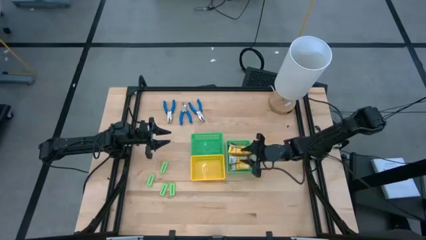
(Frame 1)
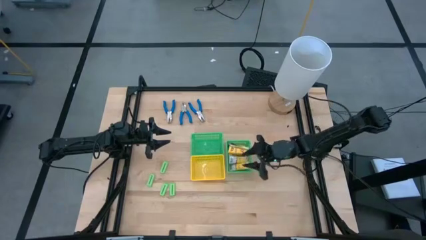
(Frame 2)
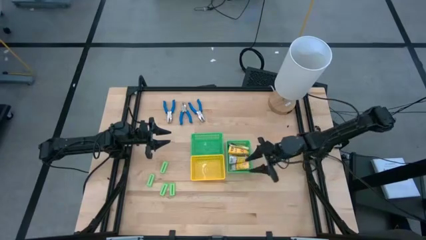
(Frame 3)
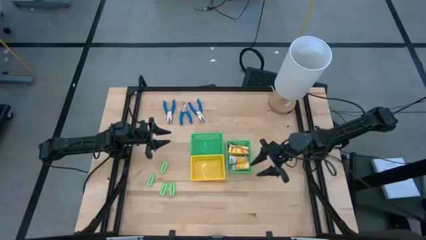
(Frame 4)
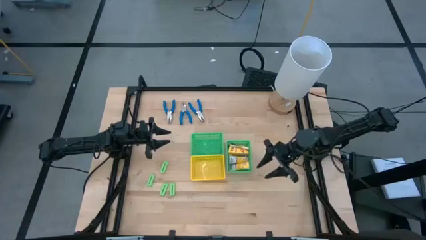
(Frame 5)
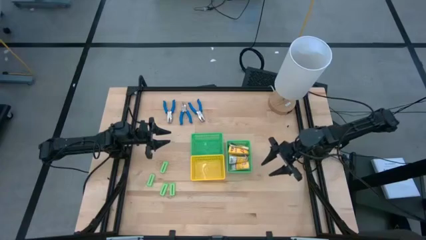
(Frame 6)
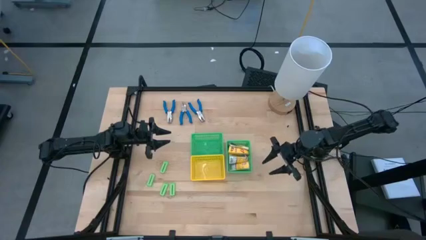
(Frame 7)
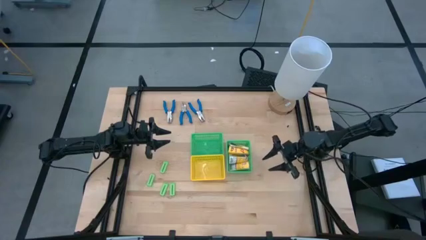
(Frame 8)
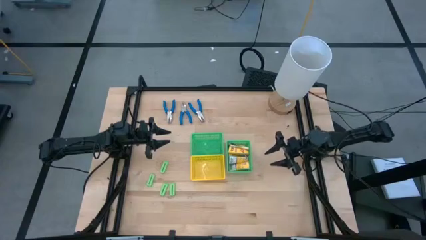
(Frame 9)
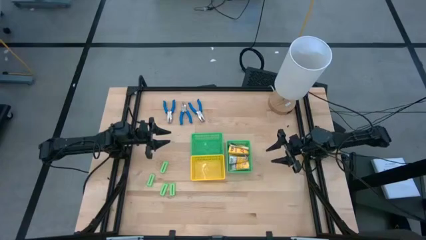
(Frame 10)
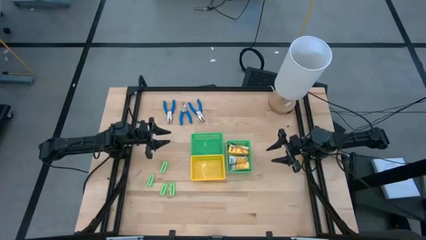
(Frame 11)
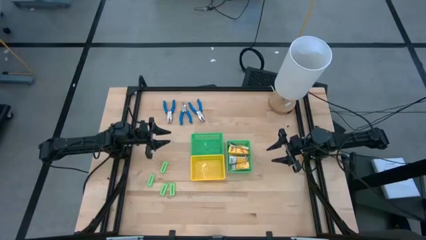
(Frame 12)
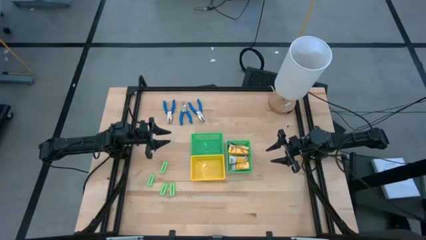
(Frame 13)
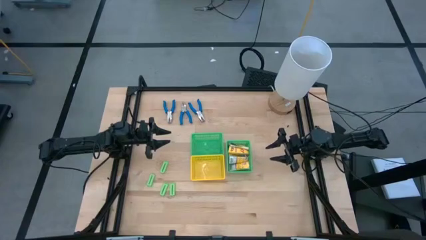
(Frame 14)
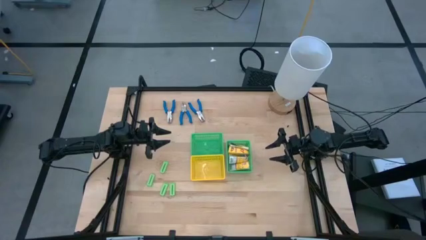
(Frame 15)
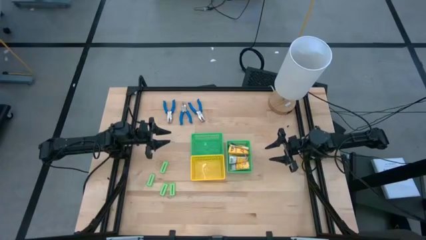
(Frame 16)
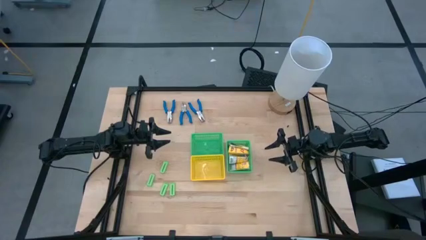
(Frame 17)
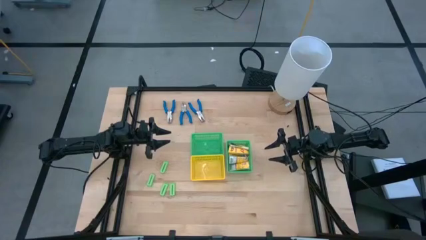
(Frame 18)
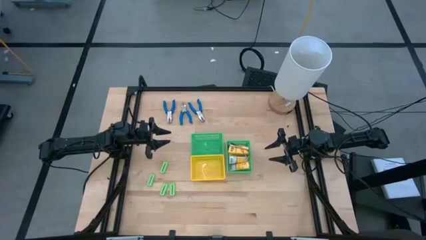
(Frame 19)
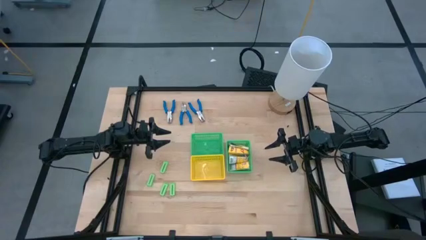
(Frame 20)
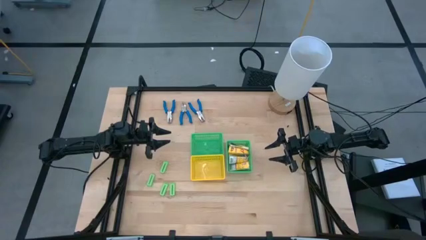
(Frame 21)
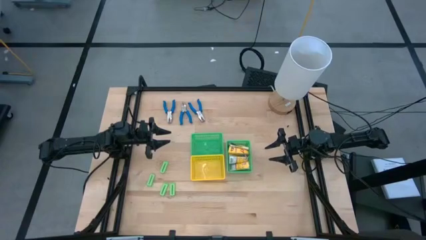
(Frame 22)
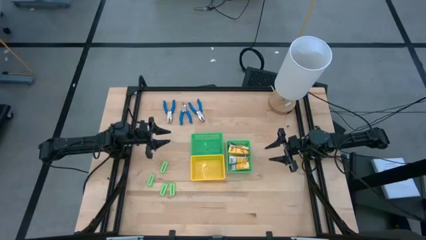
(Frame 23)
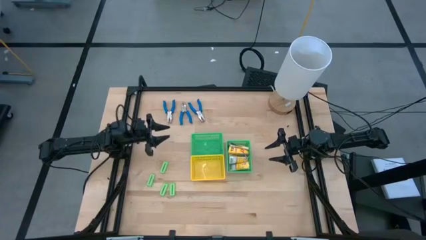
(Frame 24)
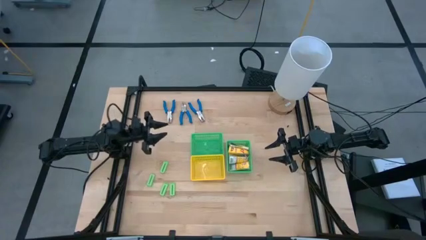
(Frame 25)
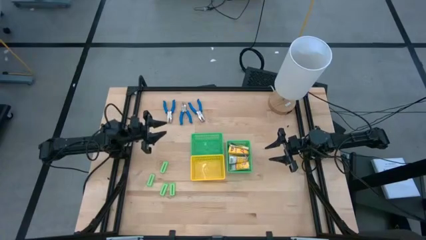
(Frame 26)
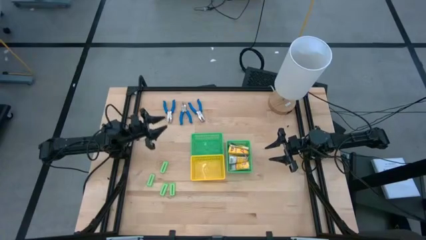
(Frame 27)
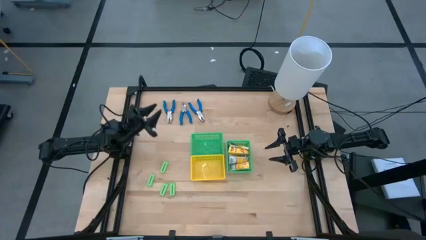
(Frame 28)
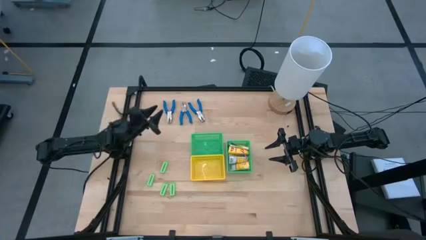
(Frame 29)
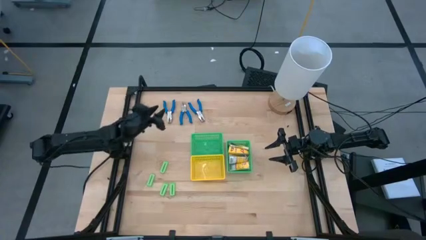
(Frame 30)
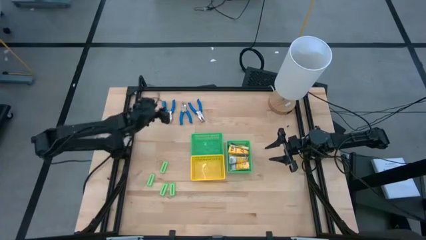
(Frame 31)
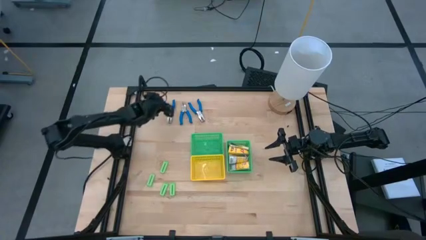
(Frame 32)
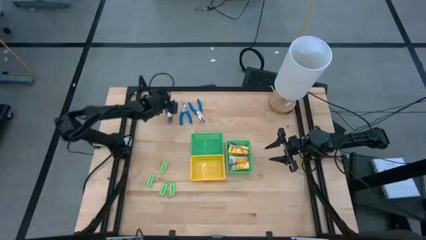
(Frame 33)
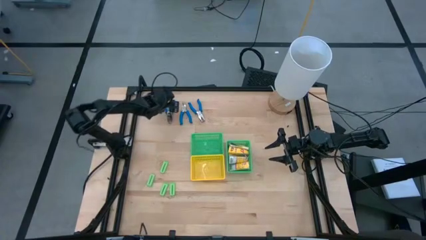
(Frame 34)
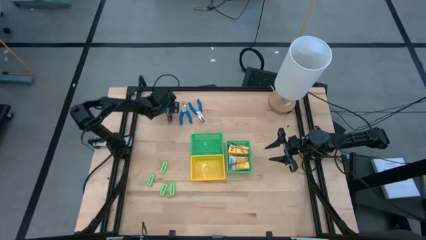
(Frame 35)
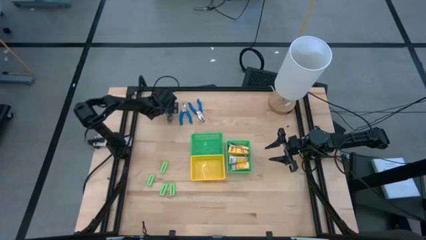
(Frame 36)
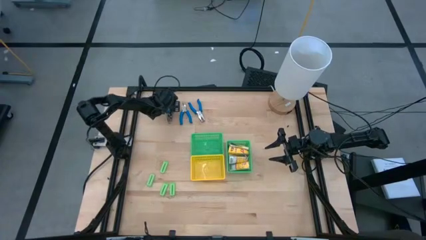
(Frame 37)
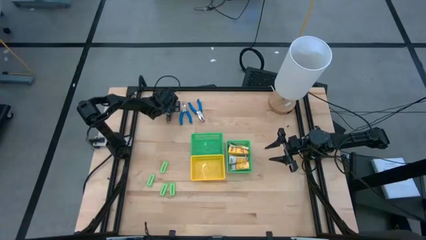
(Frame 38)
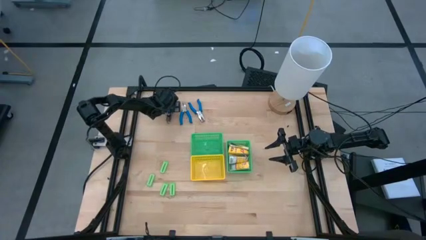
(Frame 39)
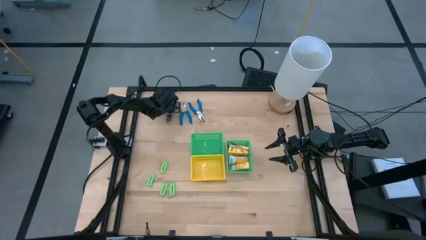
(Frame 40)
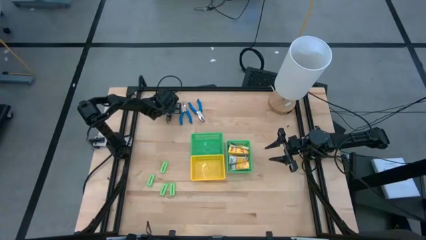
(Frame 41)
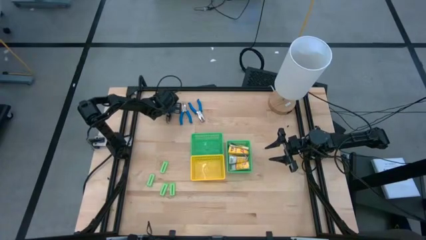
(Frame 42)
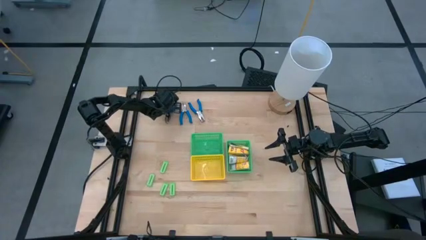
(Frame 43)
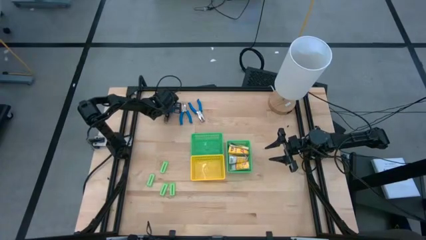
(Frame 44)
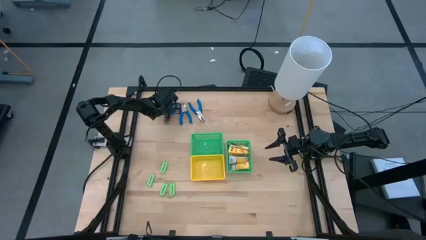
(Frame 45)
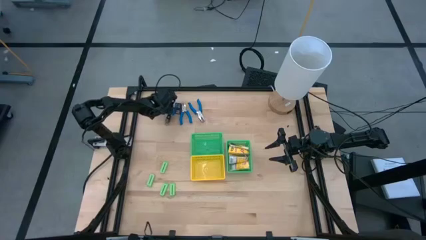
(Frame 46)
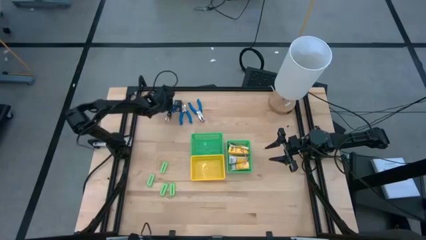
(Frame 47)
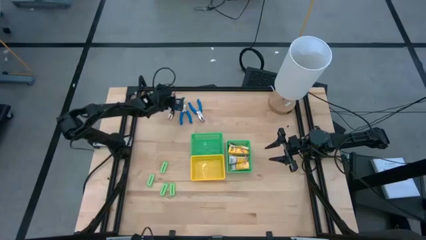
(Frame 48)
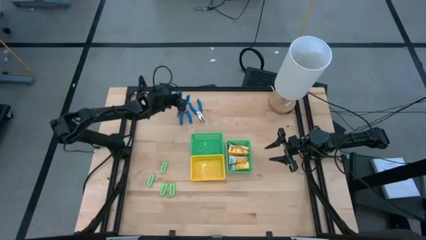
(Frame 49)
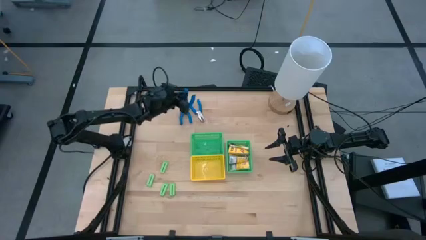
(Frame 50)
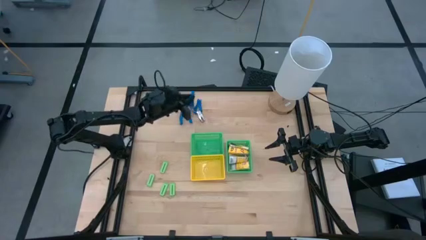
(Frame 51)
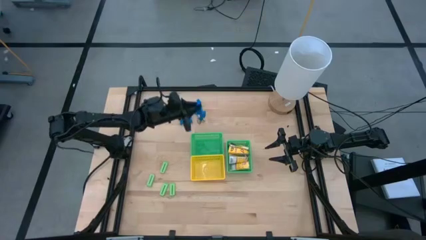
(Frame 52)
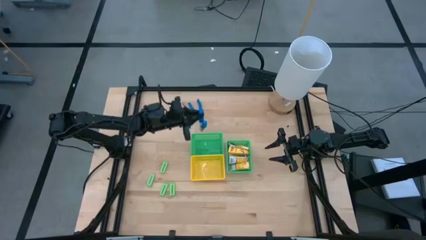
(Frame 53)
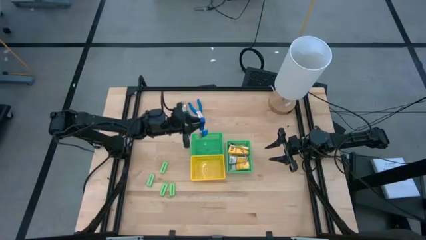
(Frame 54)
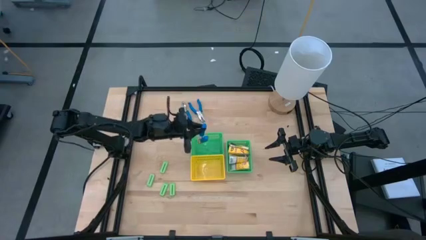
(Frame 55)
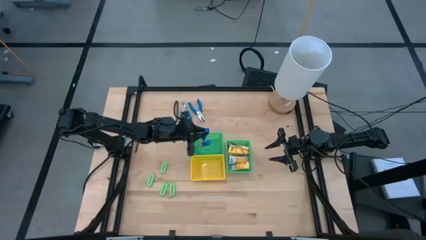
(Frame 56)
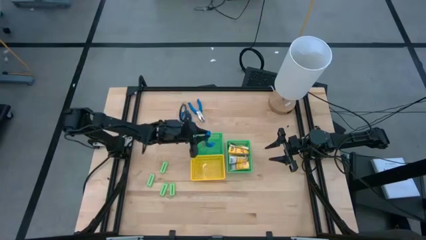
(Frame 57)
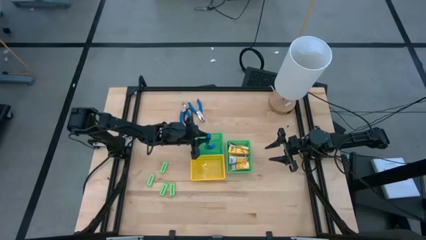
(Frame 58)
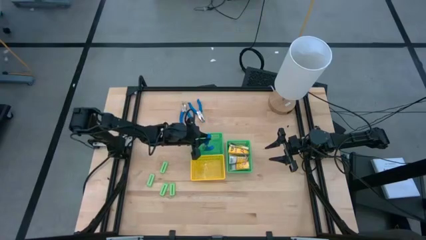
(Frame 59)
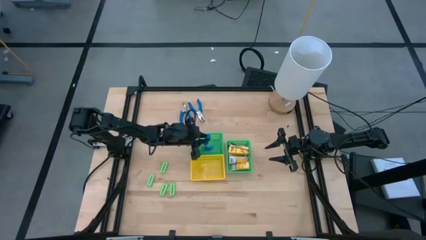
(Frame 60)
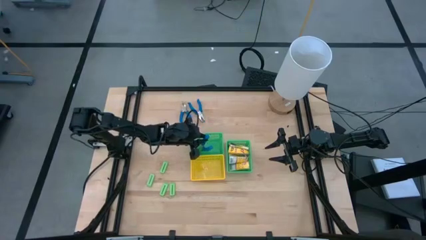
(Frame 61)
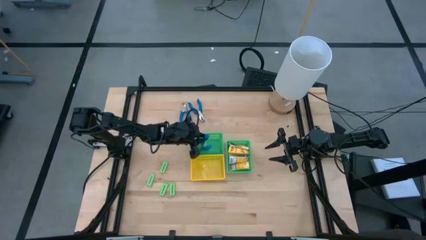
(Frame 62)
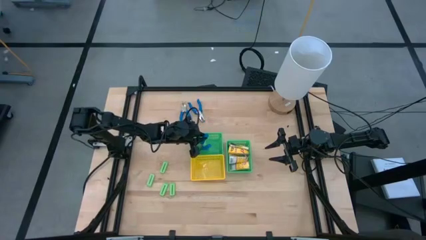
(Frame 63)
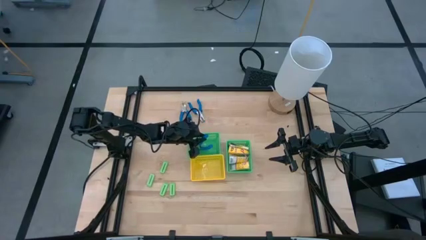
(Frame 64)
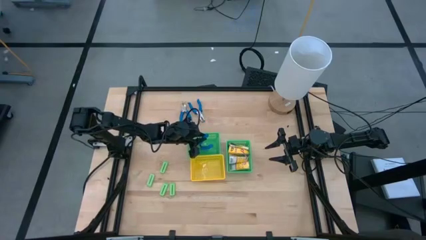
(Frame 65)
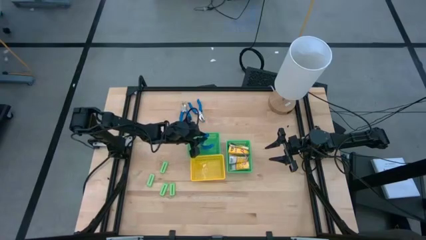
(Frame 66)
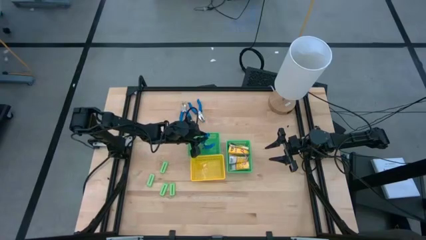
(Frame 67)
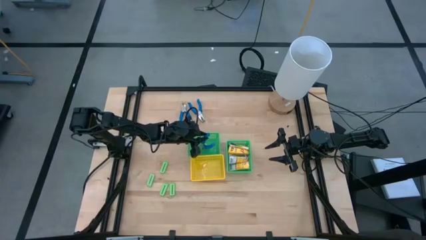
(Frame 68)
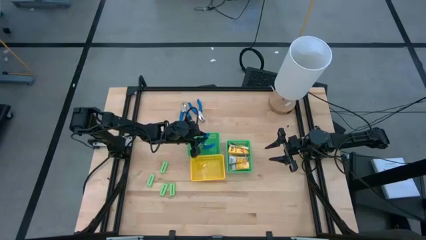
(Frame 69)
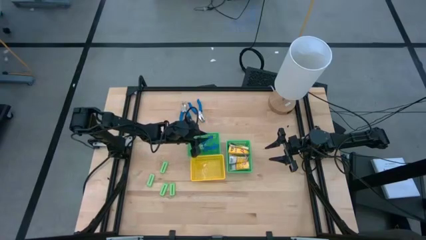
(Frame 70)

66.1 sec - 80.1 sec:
Task: Pick & Place School Supplies
Put the blue hole puncher into the left green bin

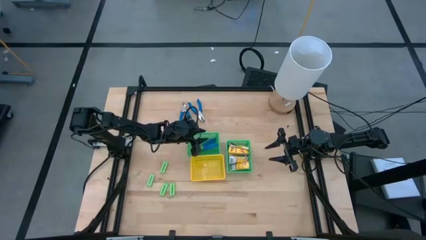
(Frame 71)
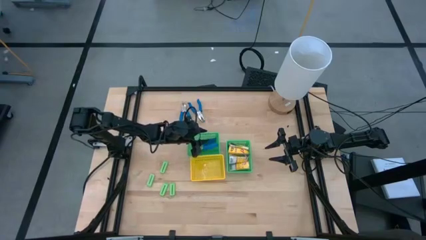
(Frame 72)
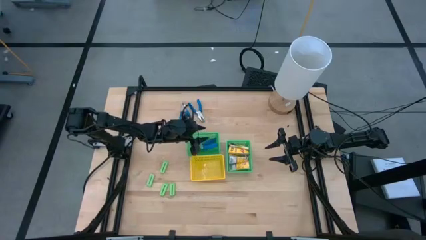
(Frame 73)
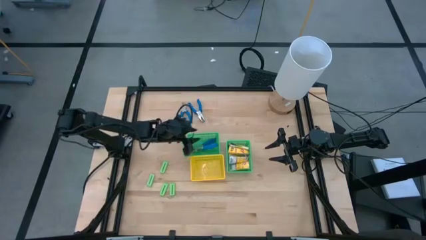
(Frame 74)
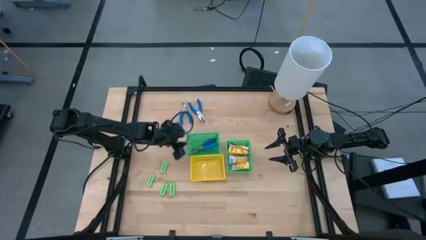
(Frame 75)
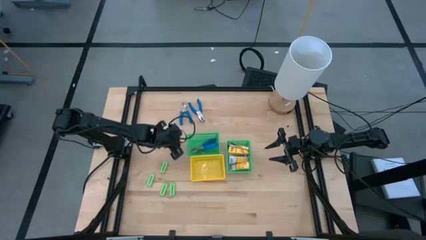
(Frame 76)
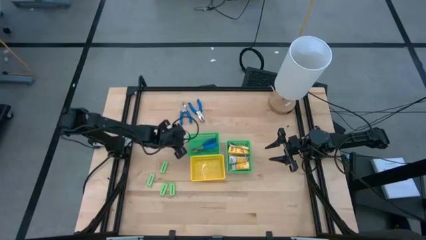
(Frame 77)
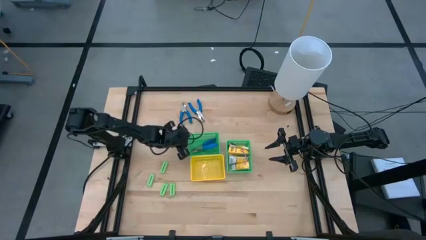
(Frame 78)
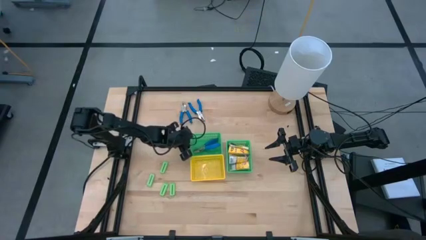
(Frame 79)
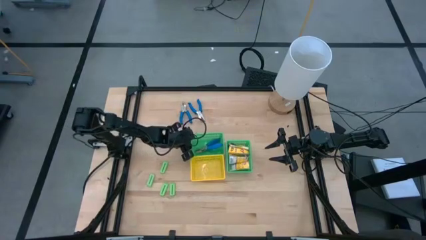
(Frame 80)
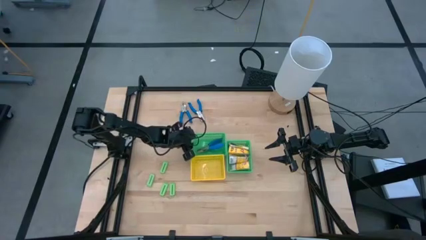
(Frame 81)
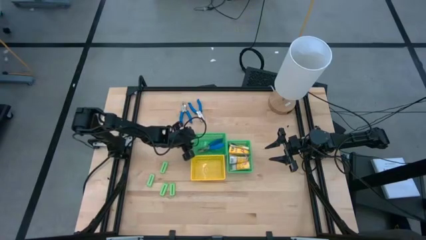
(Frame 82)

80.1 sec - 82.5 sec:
Adjust the green bin
